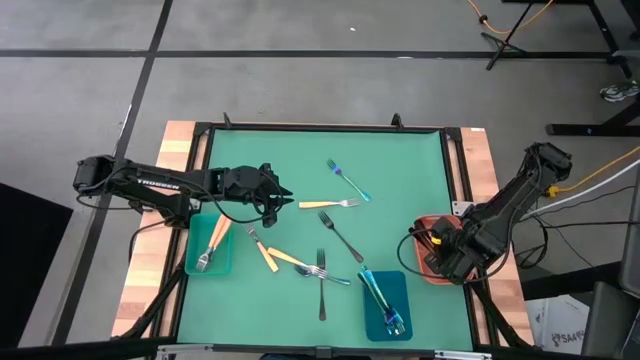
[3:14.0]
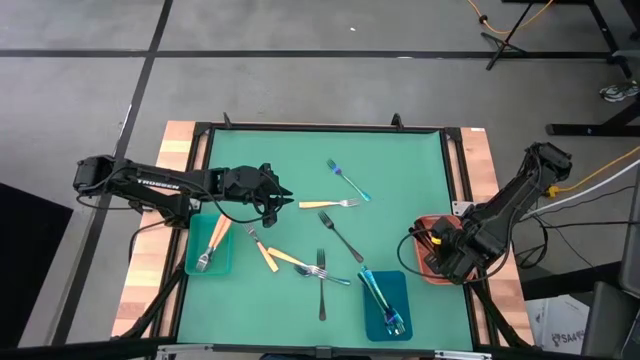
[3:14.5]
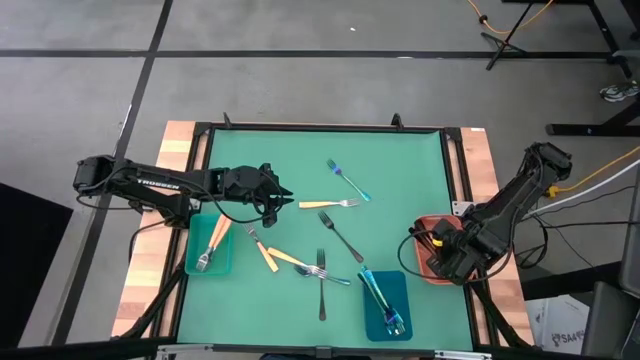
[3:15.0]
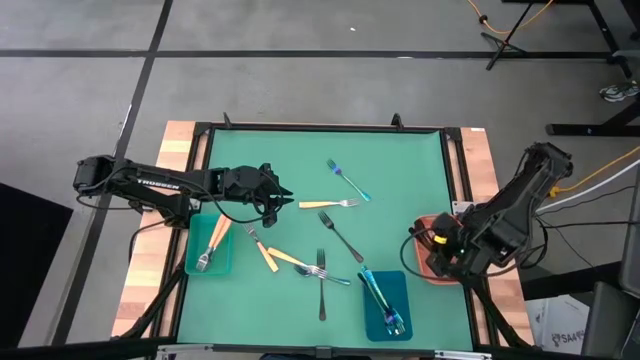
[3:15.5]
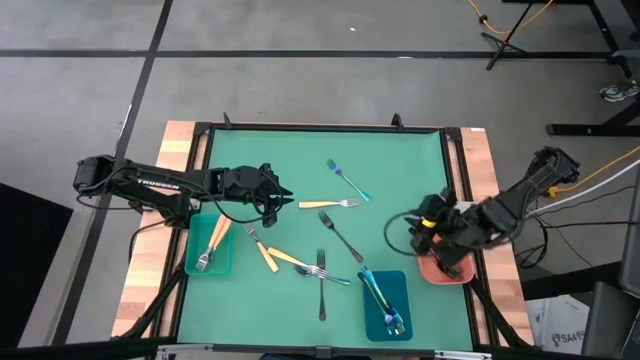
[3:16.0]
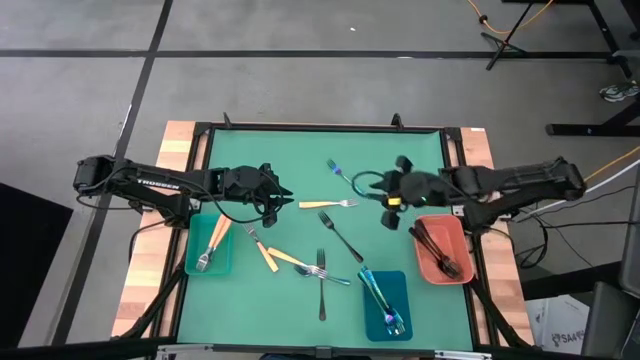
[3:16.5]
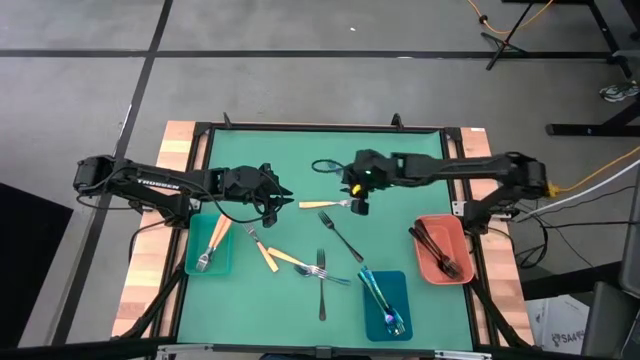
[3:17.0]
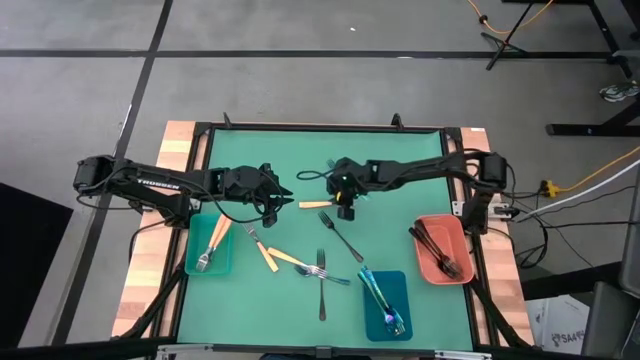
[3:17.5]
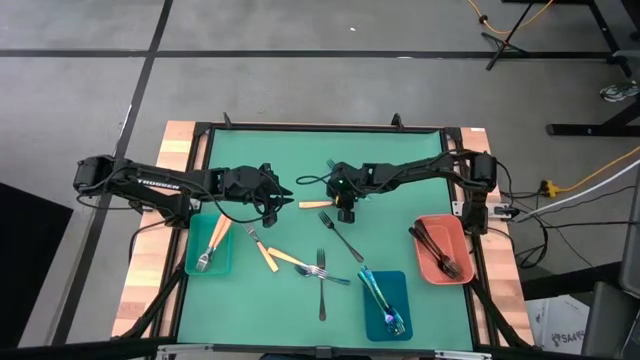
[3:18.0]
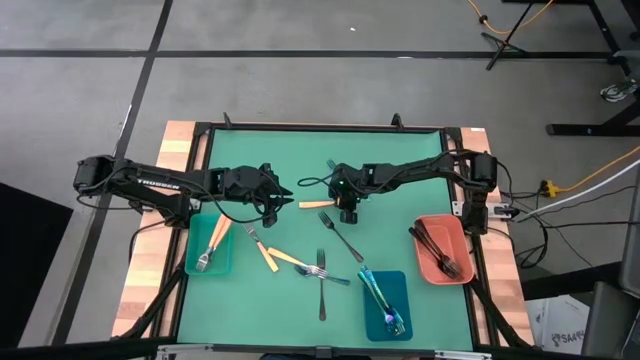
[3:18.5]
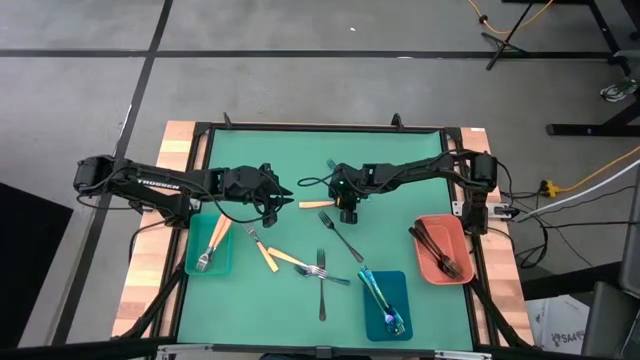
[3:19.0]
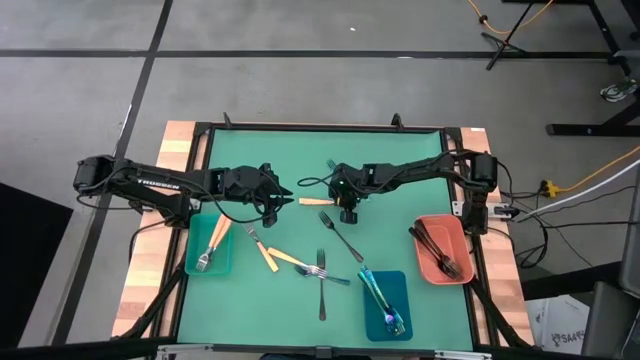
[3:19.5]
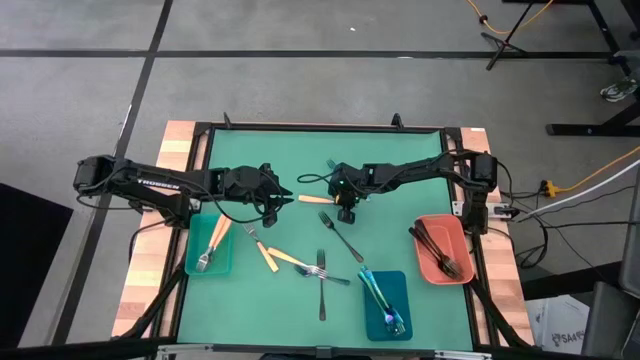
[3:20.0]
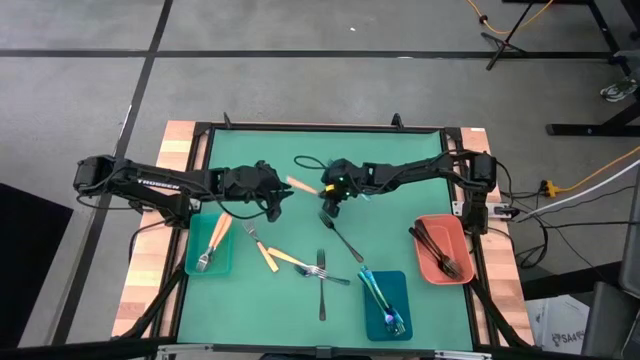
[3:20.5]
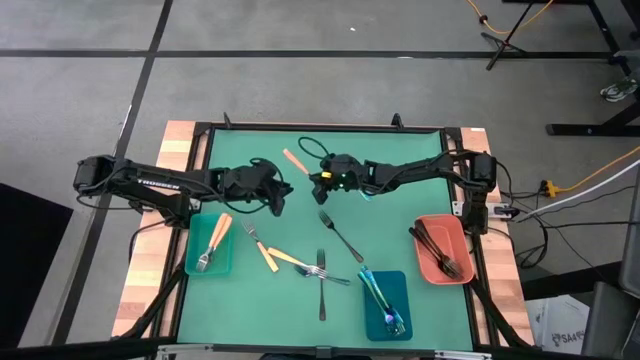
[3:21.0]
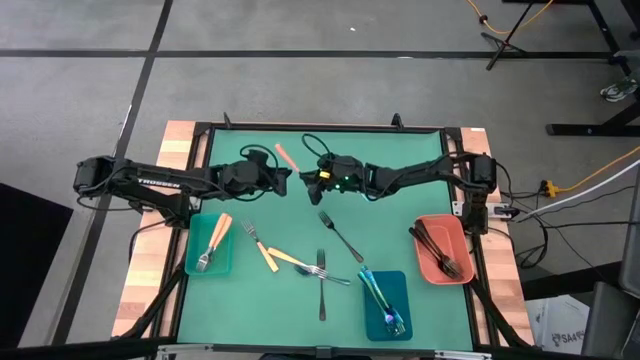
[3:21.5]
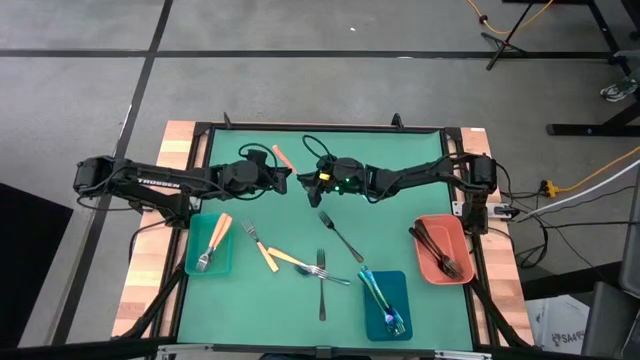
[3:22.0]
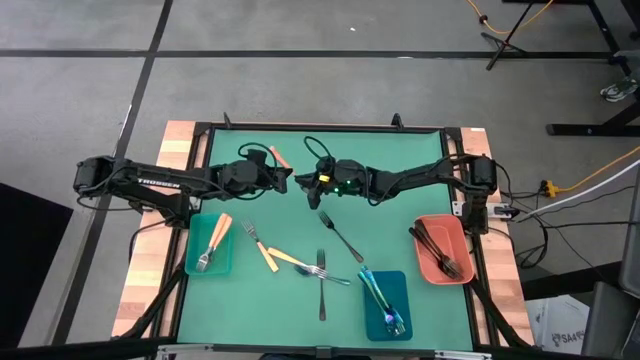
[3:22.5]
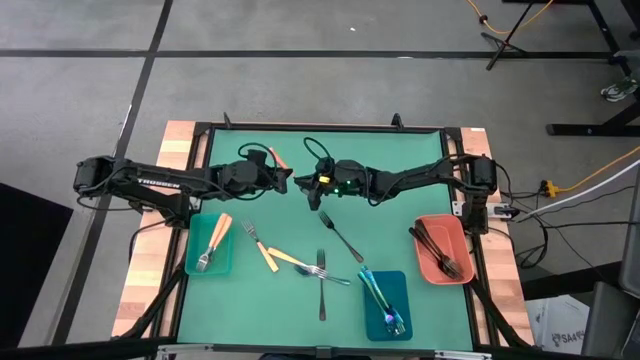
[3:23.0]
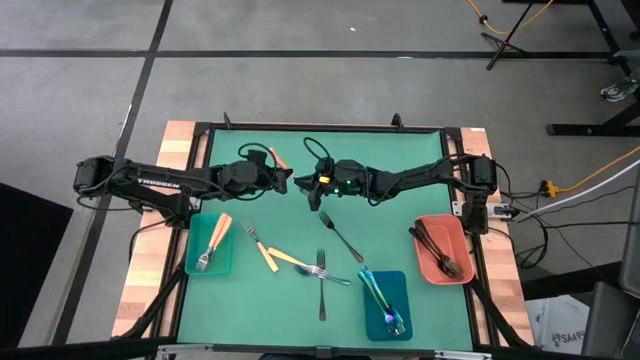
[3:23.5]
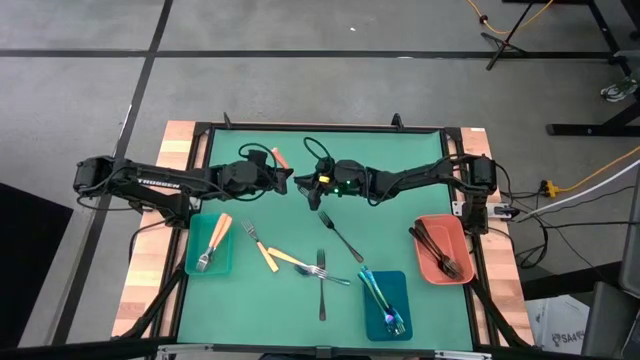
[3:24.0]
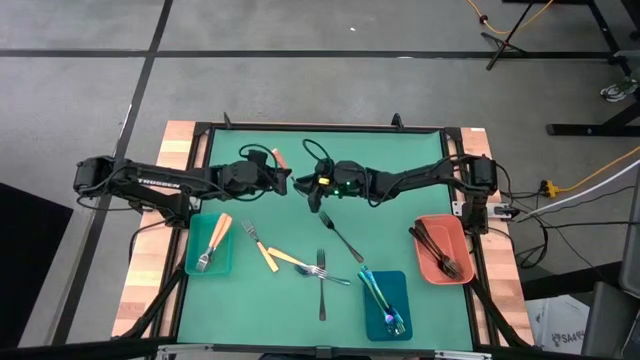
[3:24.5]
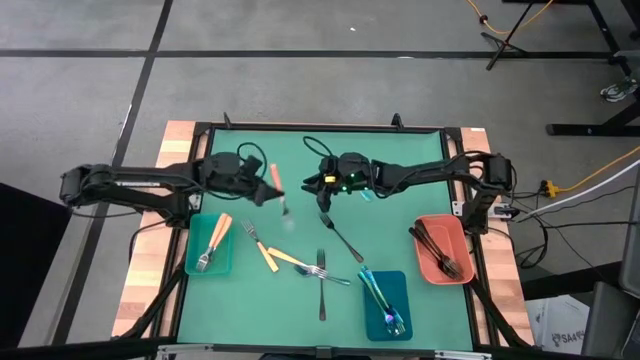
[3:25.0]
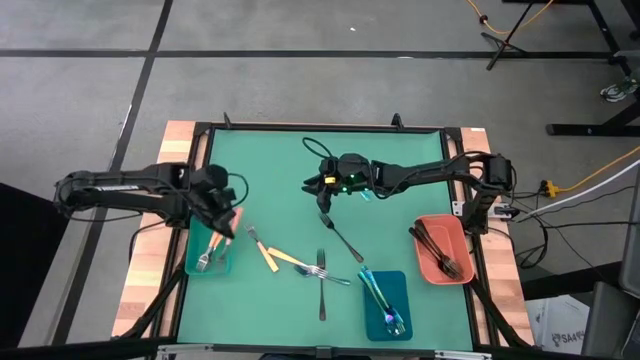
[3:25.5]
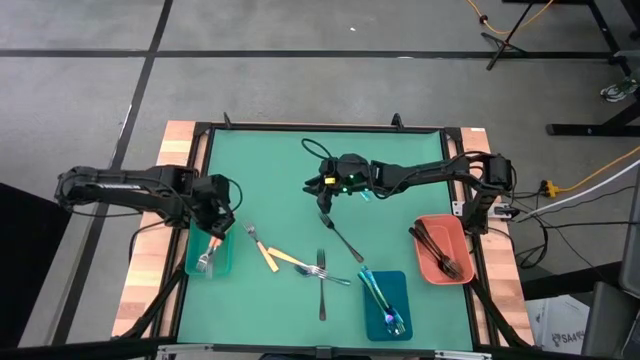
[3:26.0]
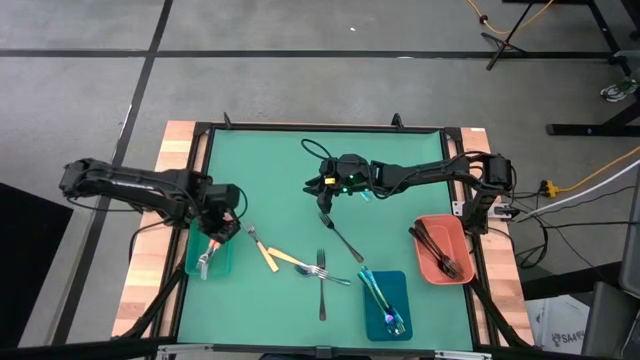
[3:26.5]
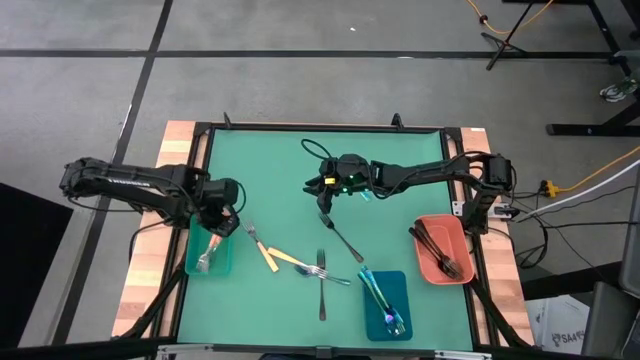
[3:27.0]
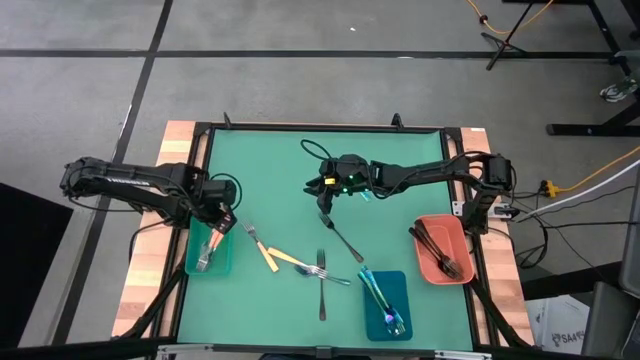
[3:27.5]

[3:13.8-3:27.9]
Task: Sort silverware by color (type)
Put the yellow fork into the green bin

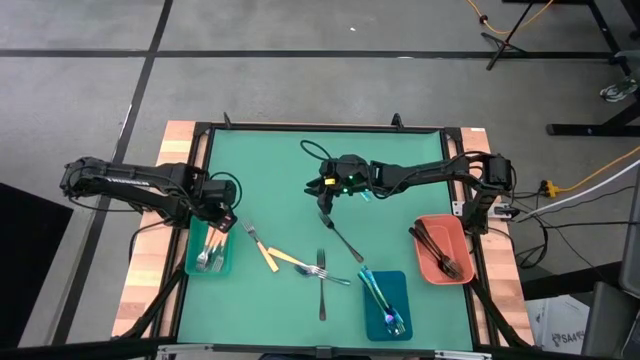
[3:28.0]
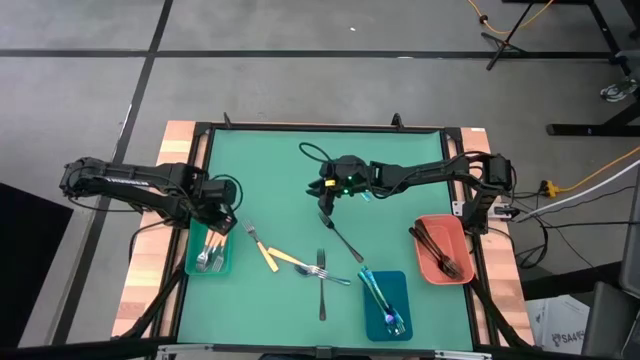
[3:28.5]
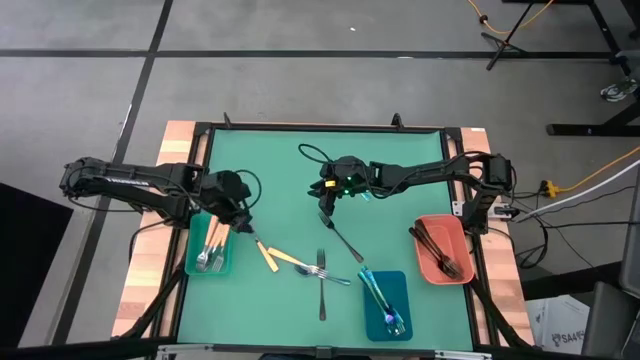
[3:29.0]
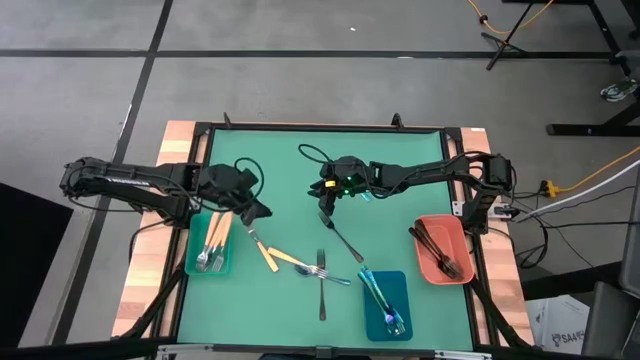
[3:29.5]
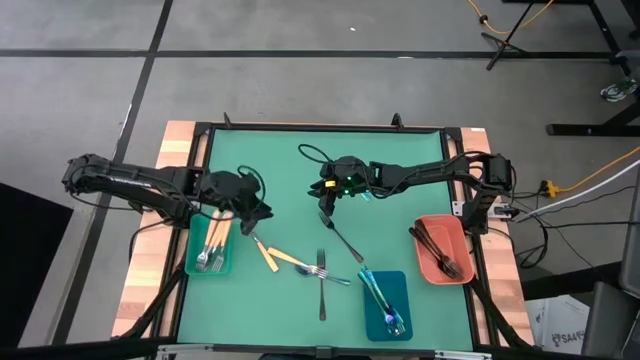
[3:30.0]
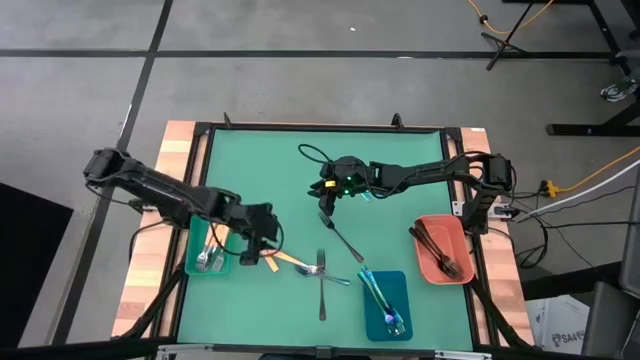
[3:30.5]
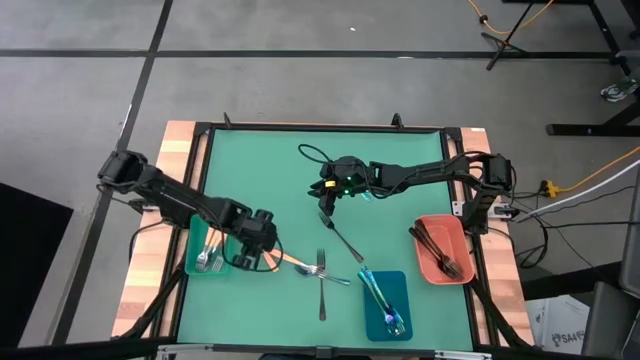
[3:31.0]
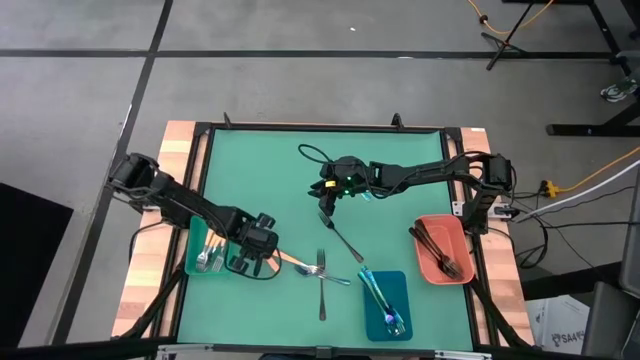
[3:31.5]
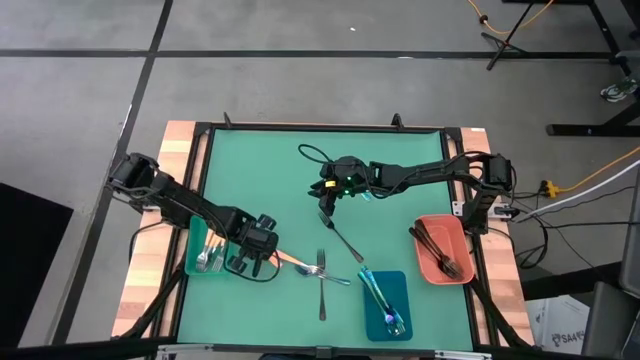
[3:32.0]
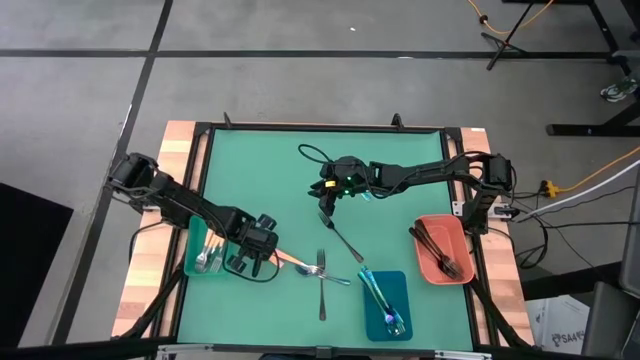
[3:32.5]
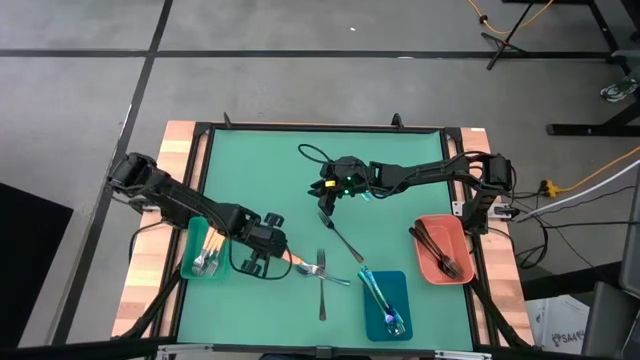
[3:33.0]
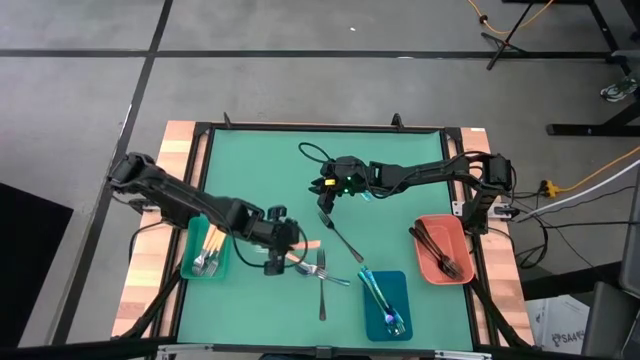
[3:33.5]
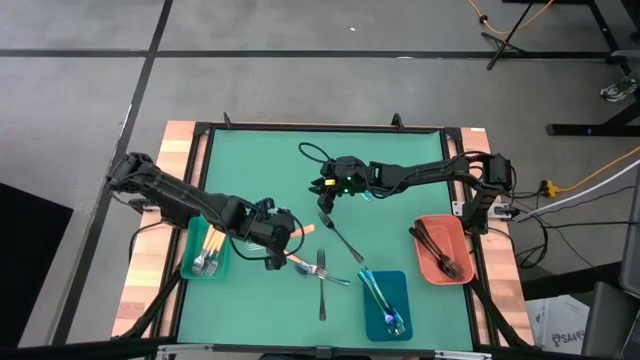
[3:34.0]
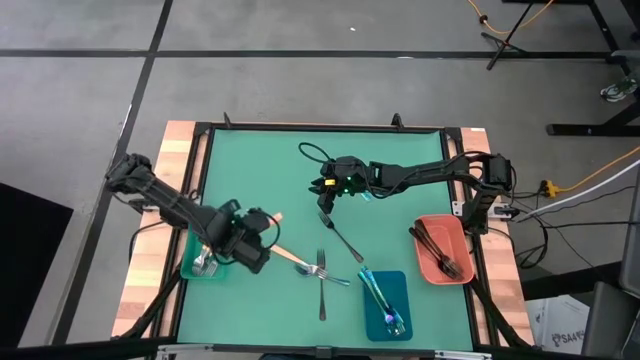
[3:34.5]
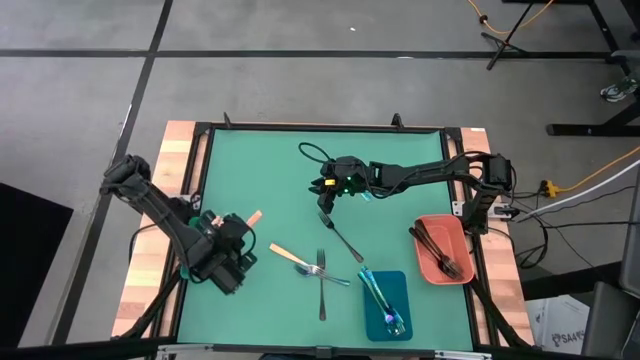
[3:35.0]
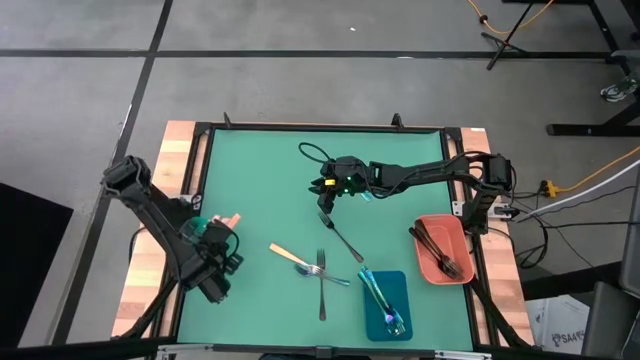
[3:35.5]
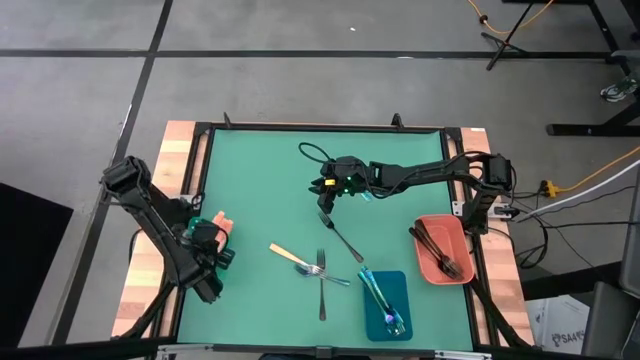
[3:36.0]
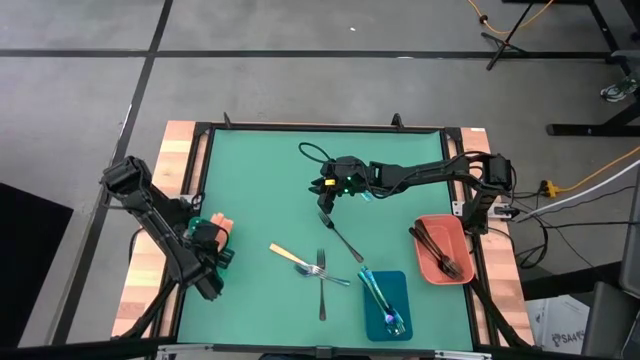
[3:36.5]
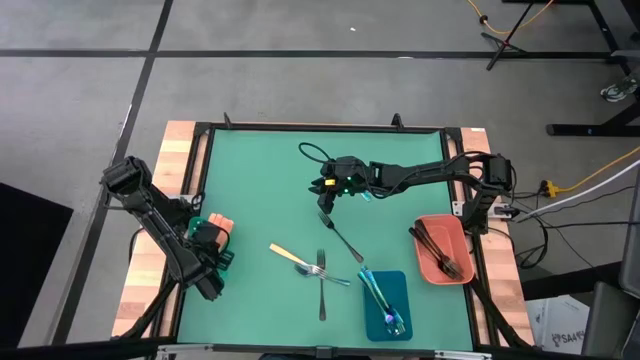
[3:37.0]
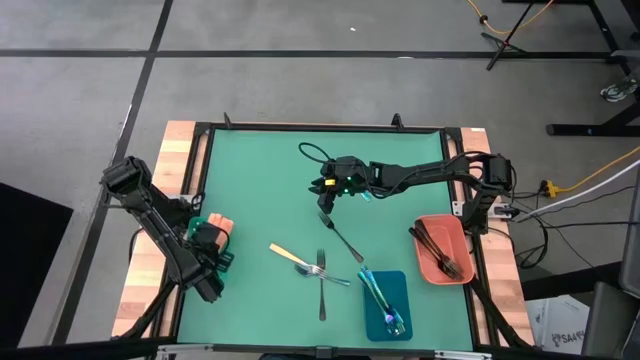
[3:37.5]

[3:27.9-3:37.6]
Put the yellow fork into the green bin
